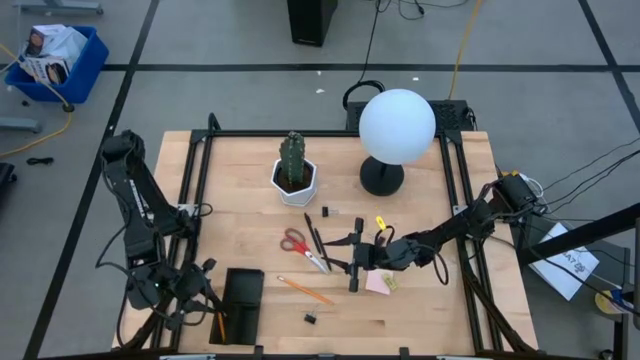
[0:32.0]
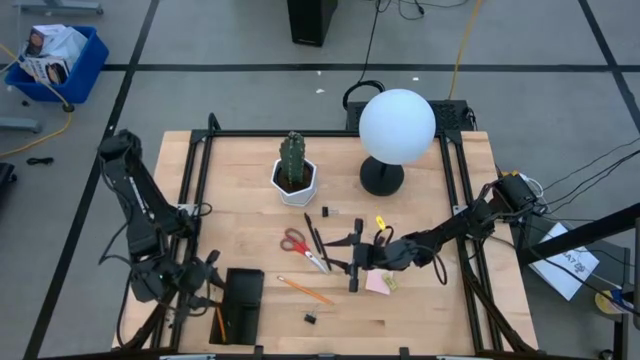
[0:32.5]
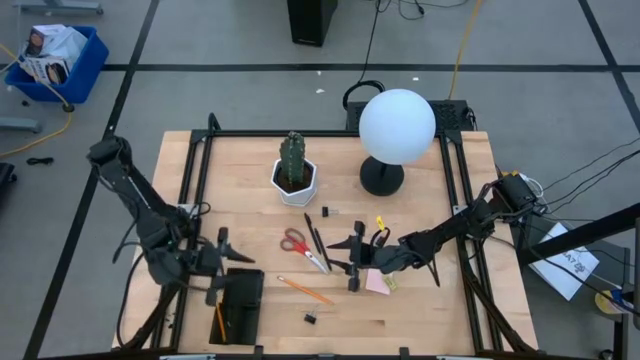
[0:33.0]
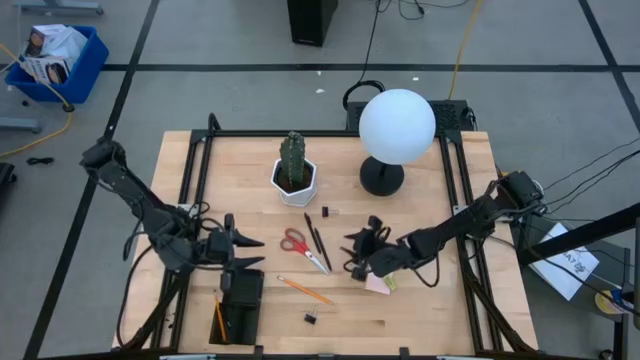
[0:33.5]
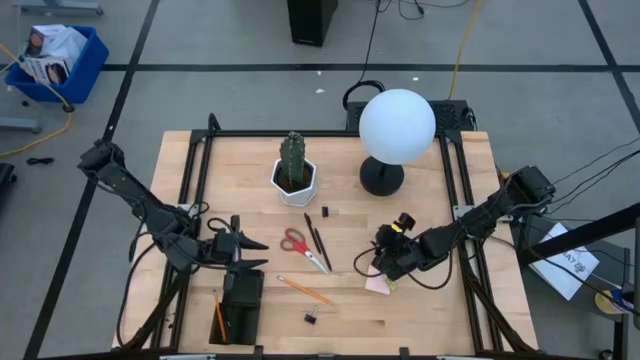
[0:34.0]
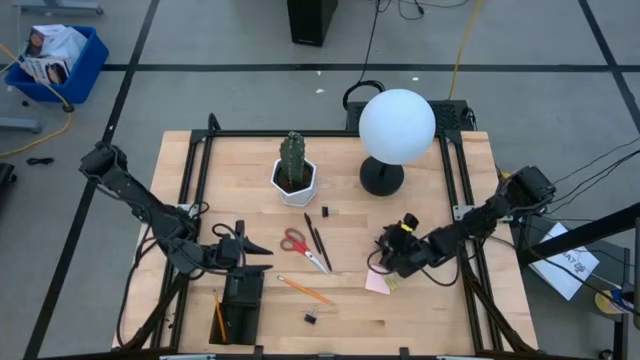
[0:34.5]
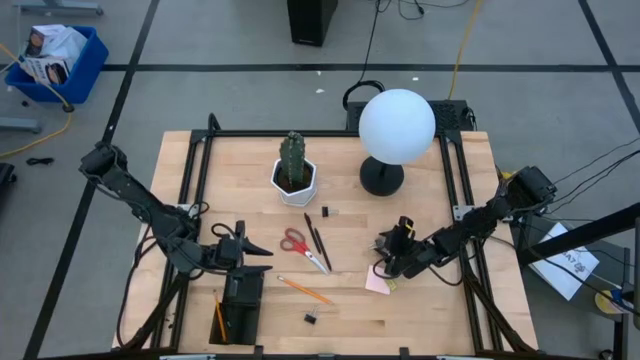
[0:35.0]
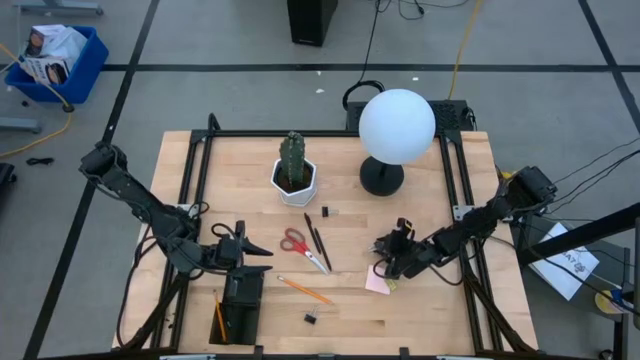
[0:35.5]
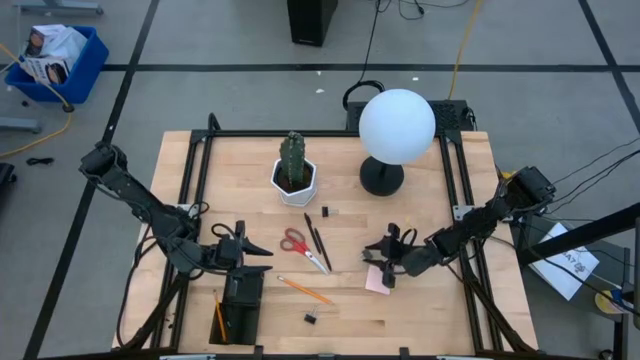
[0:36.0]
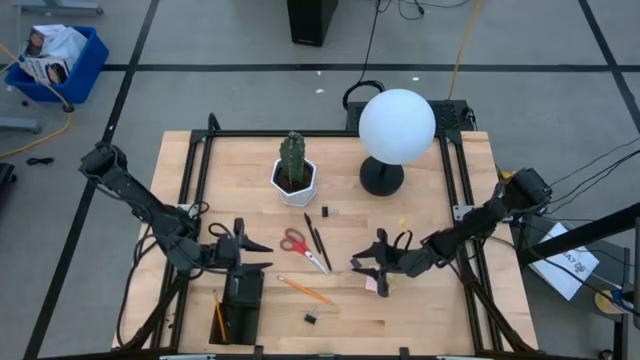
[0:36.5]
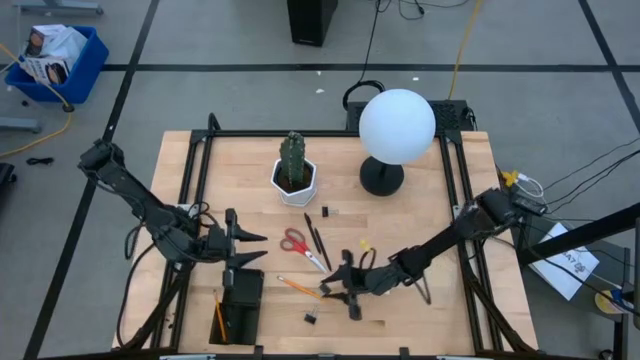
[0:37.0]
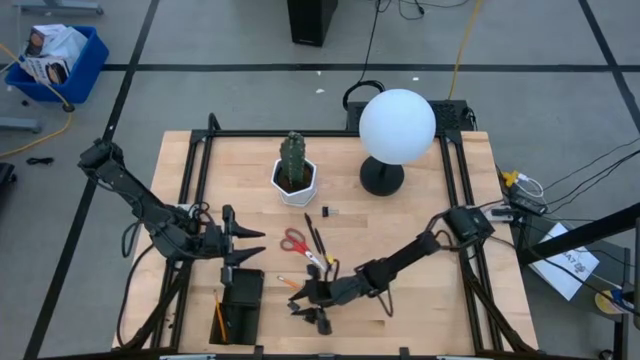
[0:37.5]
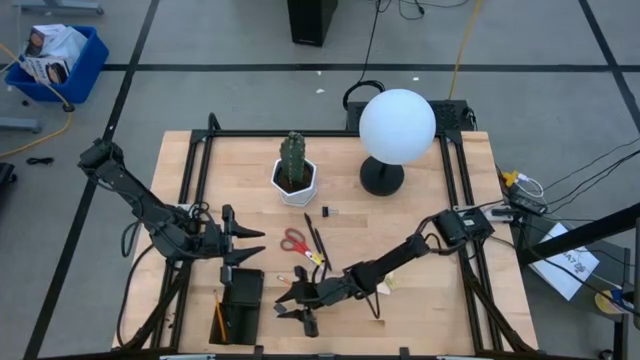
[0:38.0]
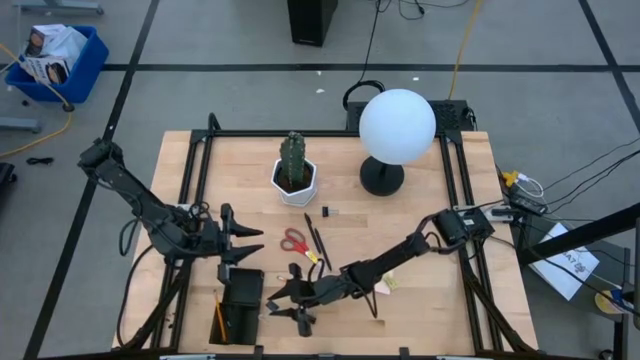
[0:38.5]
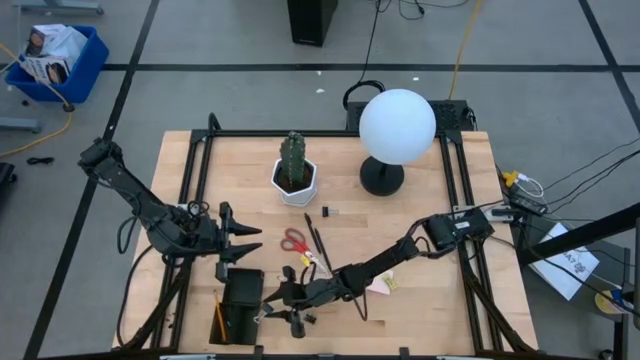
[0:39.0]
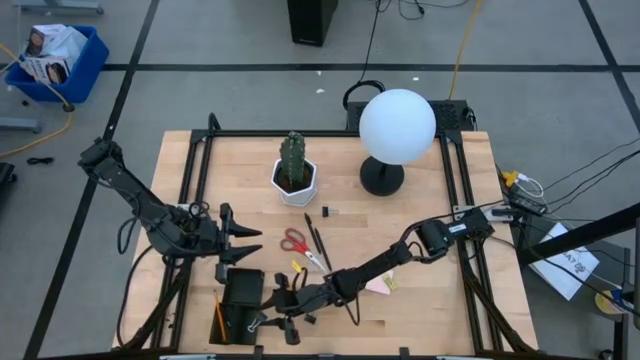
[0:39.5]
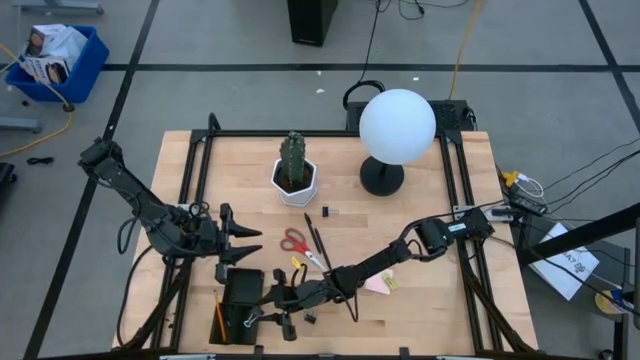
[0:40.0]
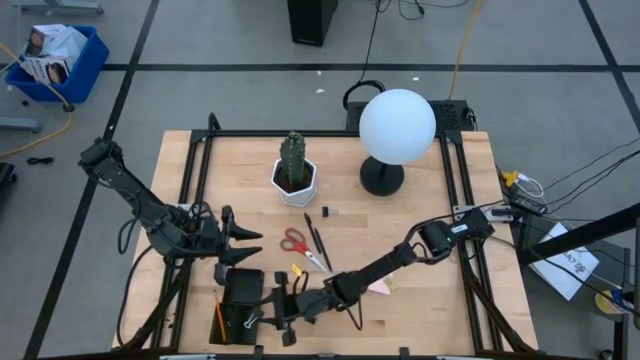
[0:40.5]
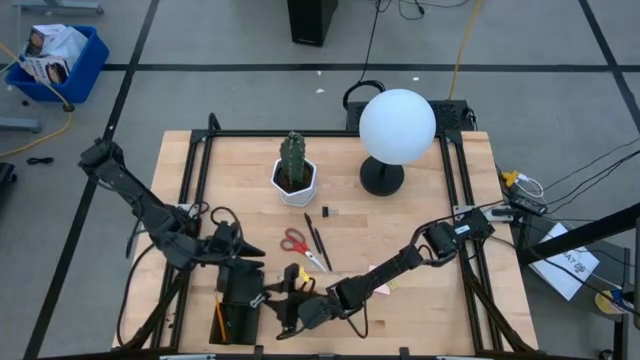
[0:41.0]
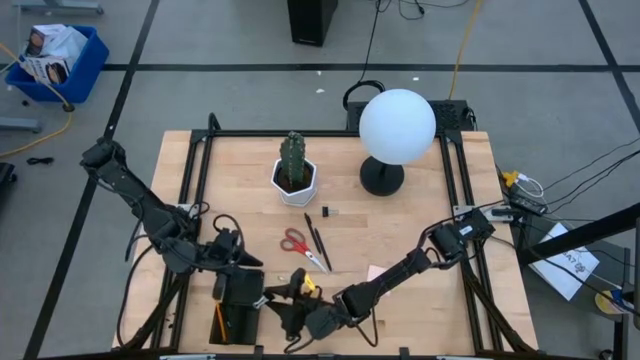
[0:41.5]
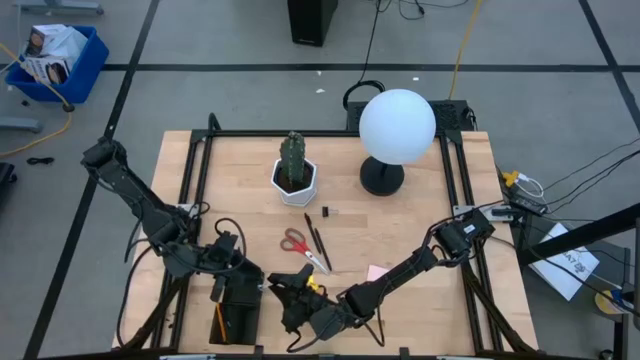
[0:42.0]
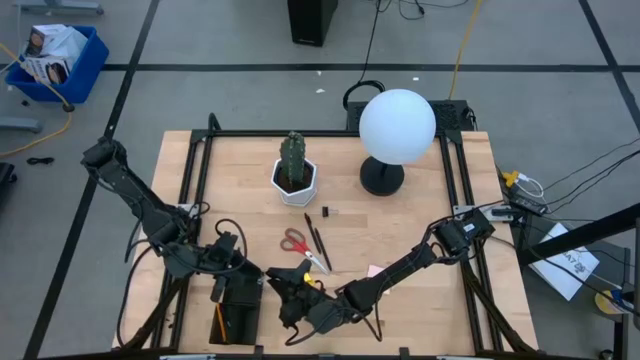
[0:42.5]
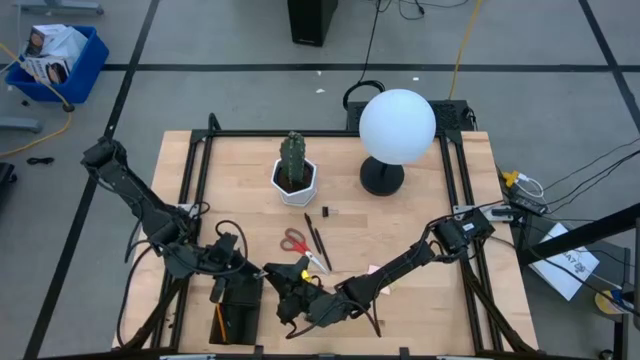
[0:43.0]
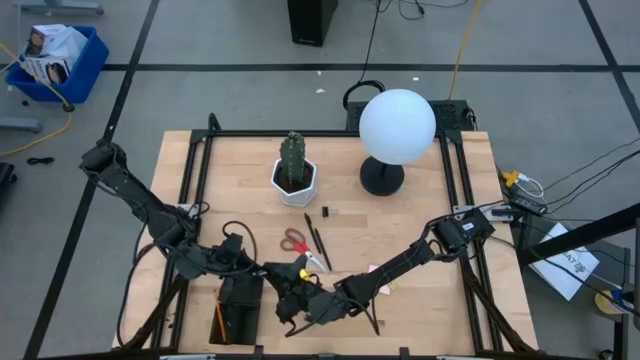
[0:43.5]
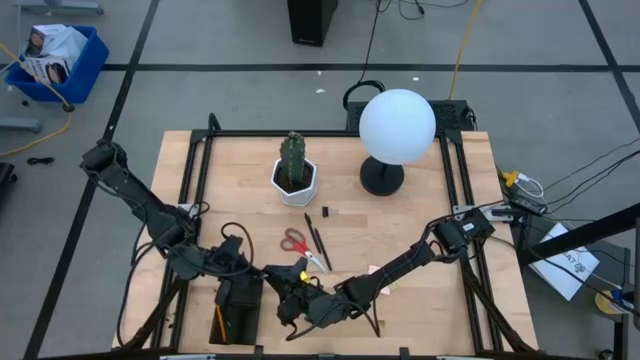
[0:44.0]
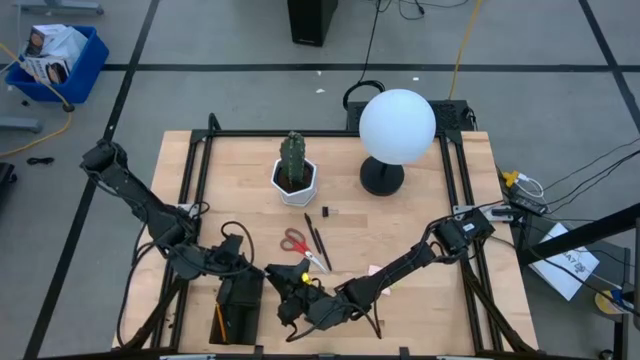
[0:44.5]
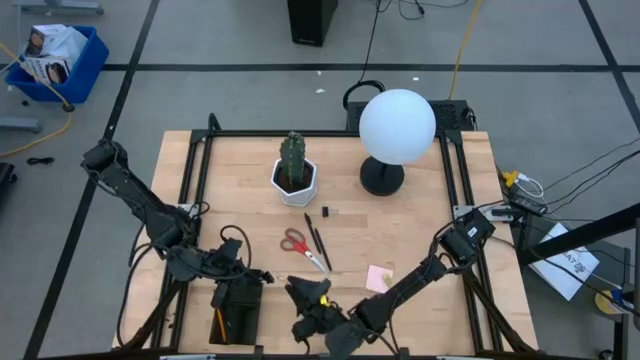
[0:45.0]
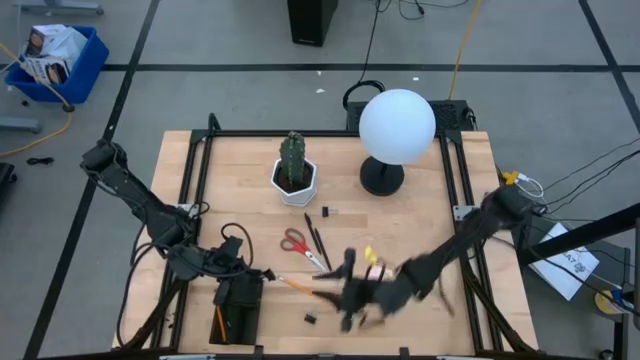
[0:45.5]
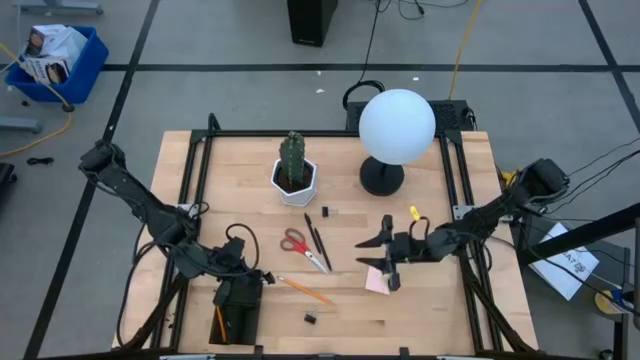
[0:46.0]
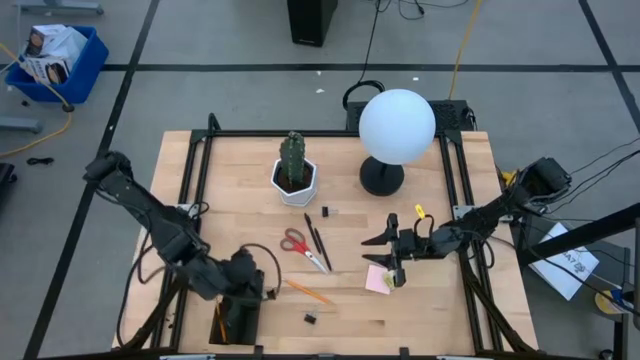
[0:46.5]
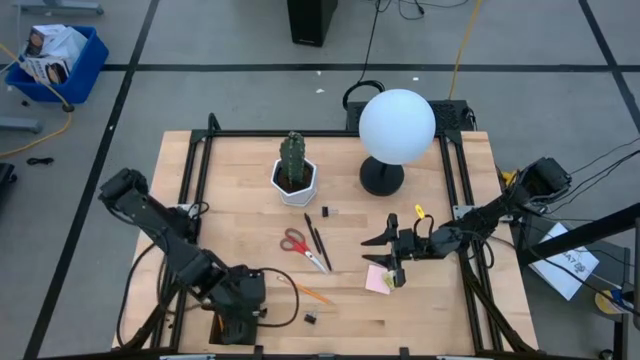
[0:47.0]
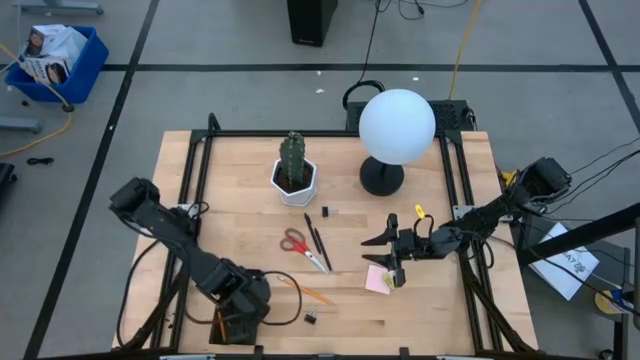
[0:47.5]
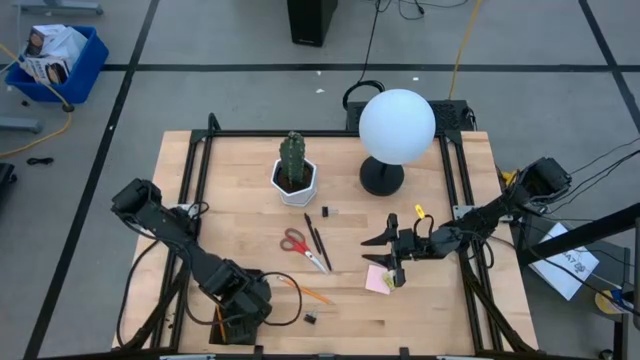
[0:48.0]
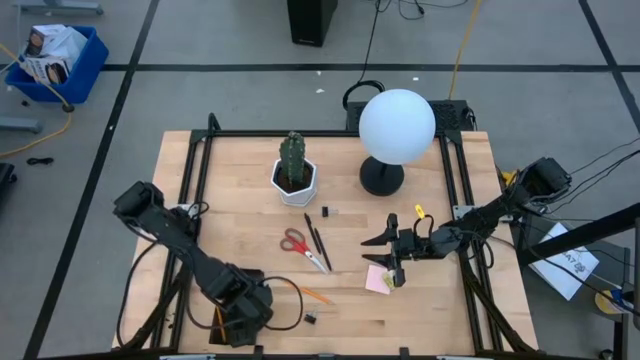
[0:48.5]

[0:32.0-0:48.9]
Task: Pick and place office supplies into organizer
Put the right binder clip in the desk organizer

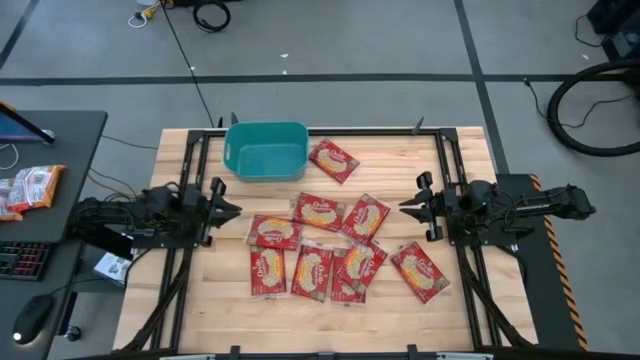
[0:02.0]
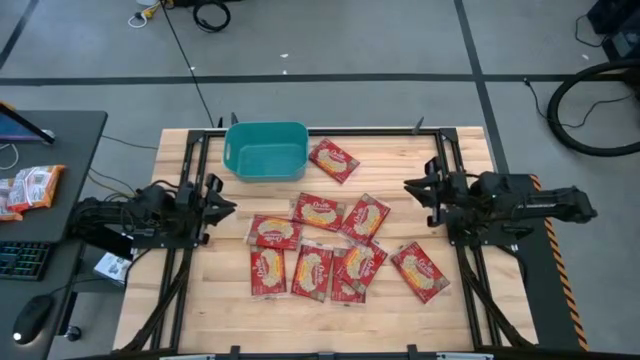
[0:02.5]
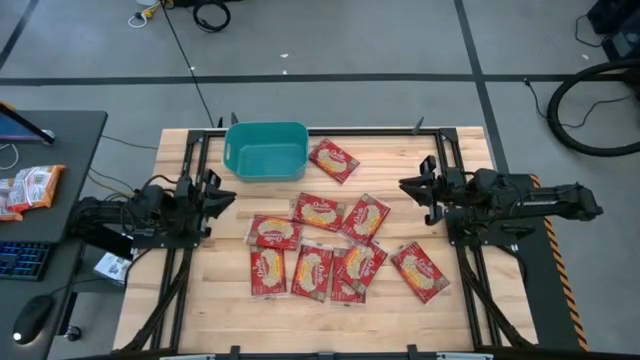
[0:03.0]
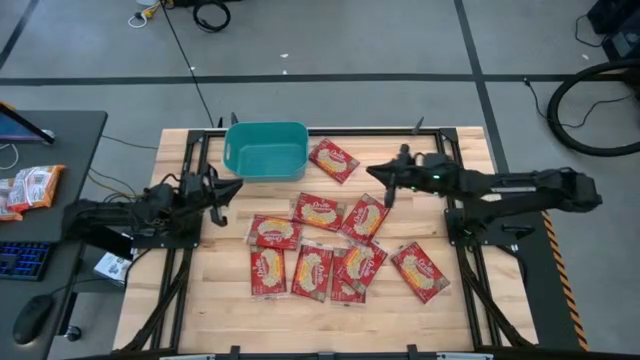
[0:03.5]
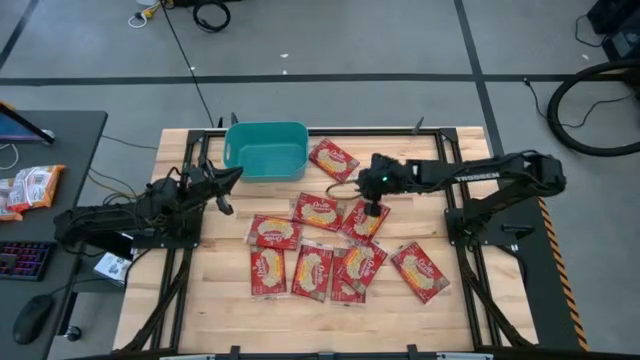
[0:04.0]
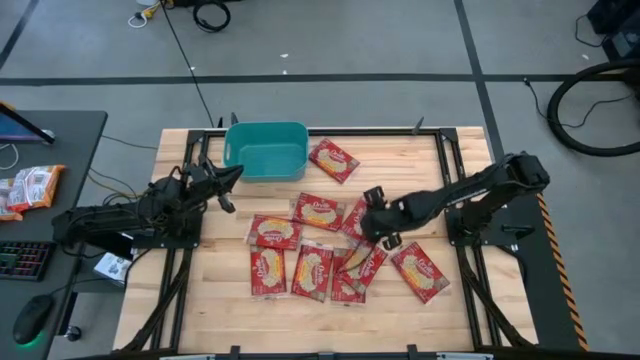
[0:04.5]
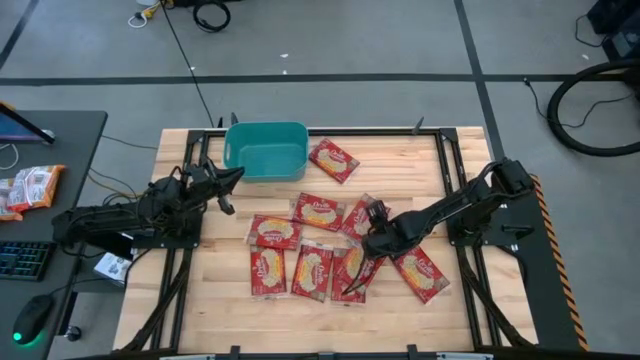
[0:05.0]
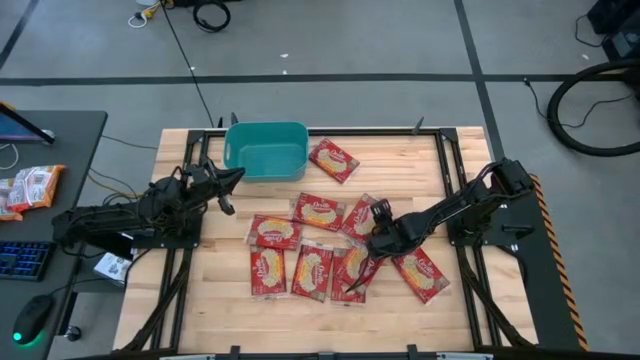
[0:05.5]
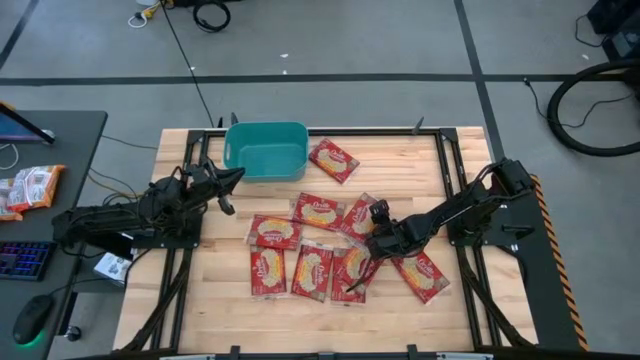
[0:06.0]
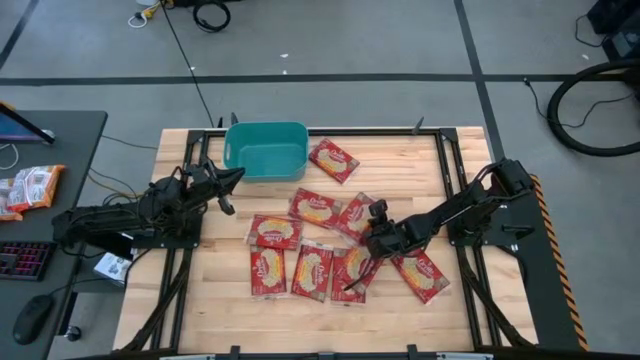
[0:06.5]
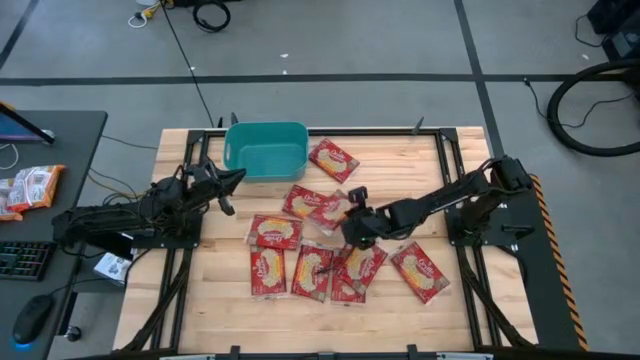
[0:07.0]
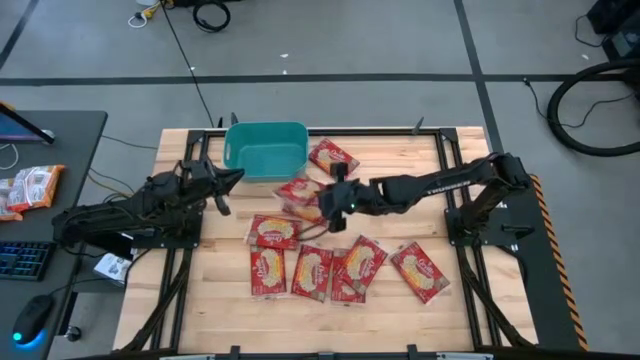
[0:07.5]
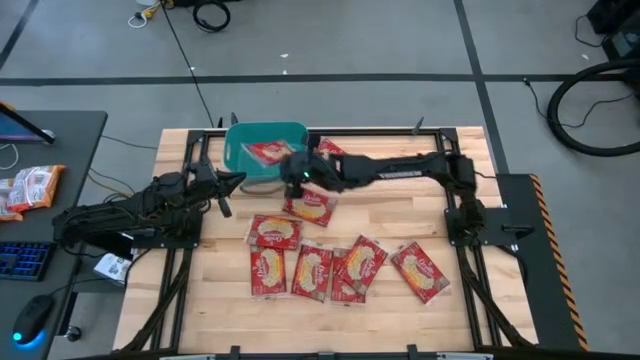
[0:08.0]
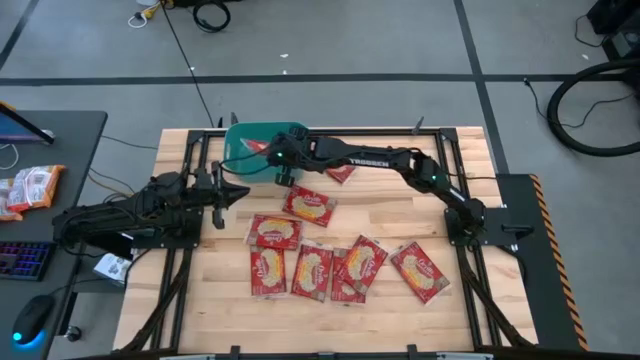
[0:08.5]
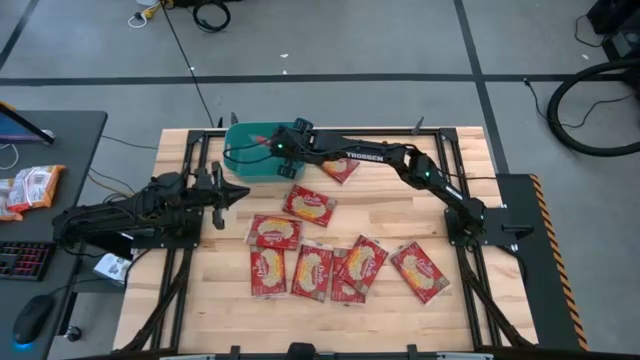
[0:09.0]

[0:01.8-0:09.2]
Task: Sort popcorn bags into baskets
Put the red popcorn bag into the green bin
